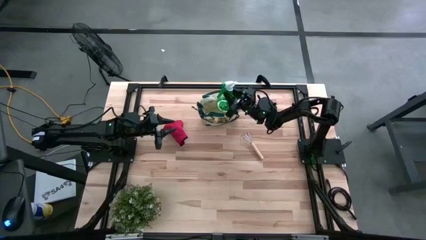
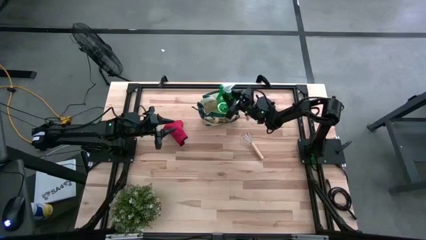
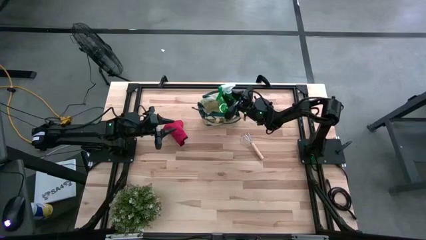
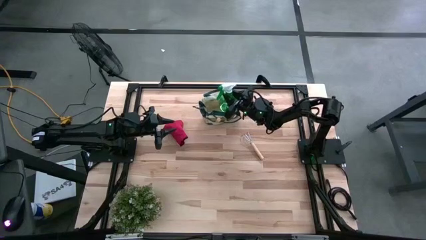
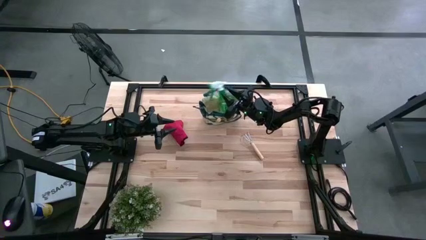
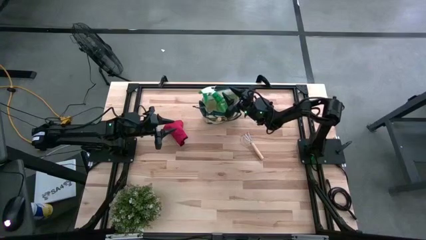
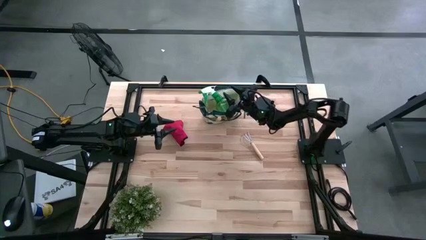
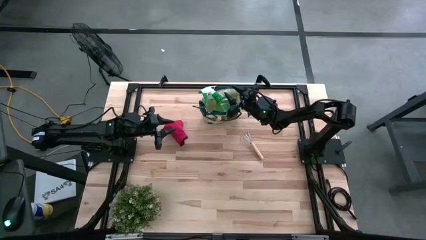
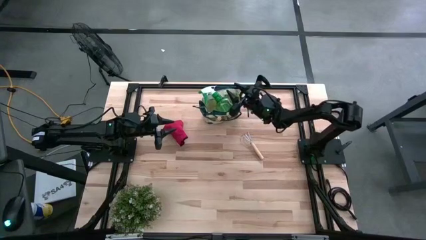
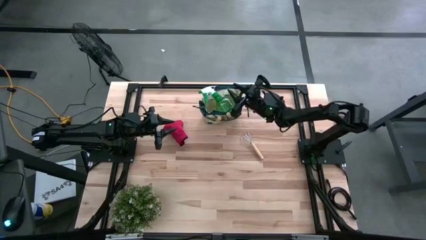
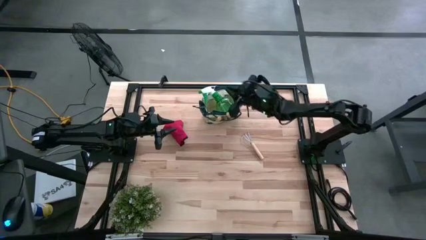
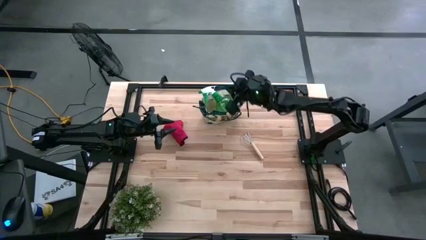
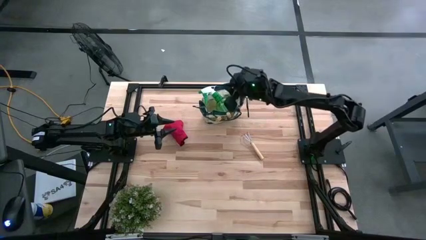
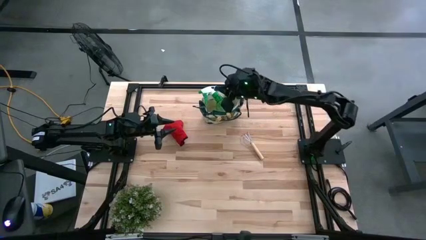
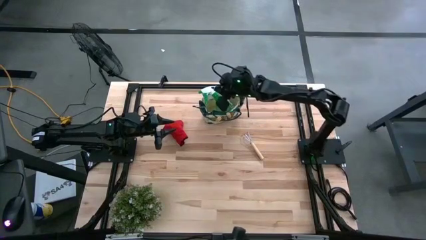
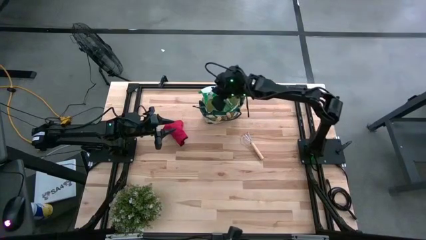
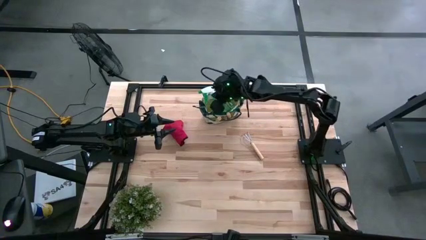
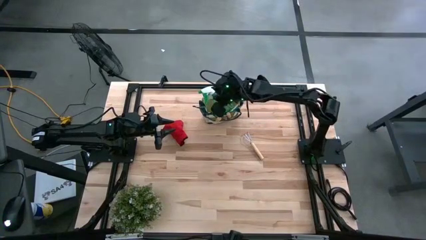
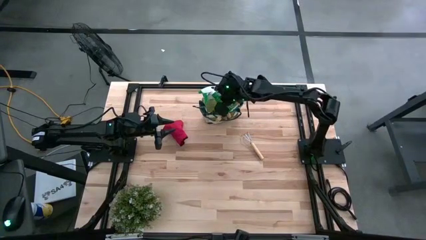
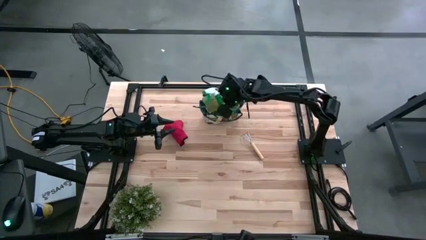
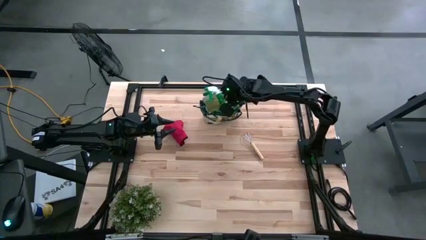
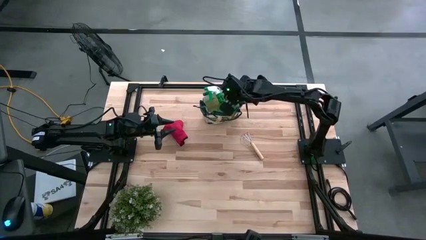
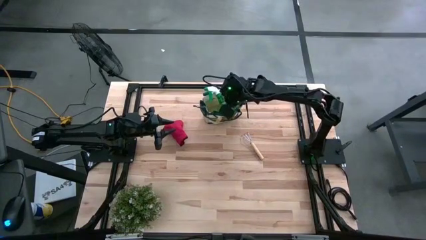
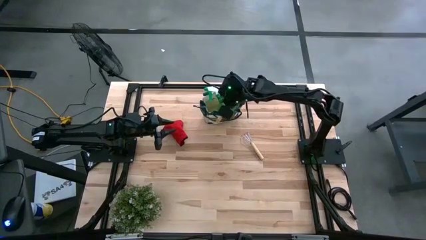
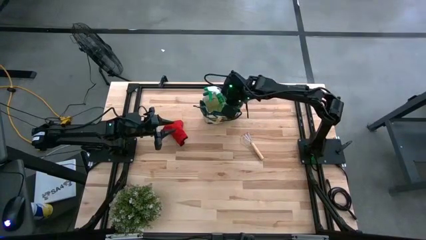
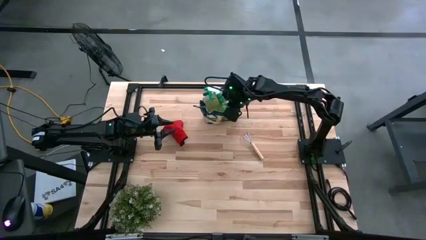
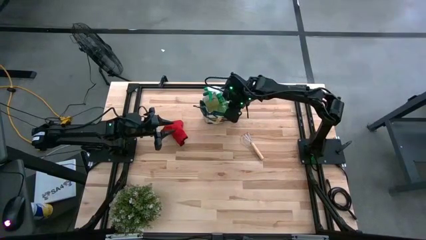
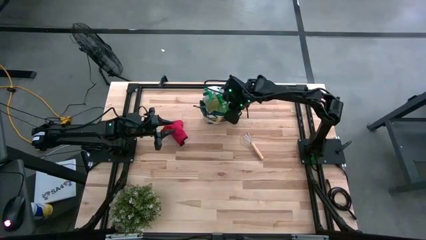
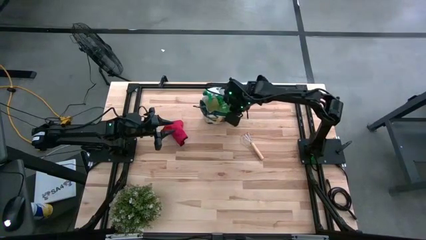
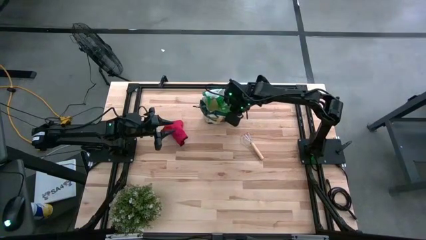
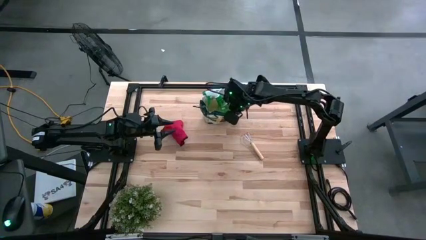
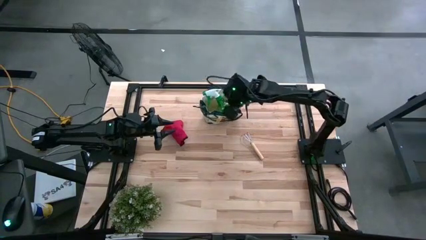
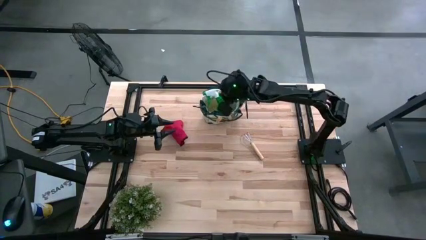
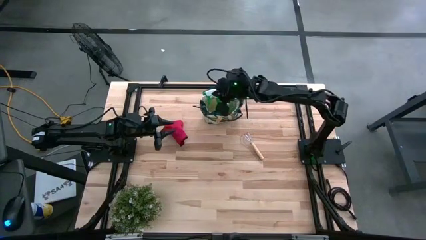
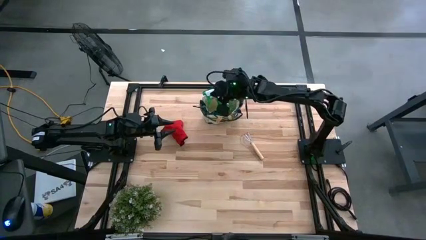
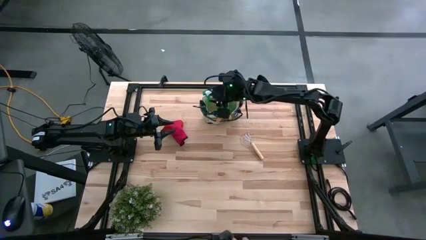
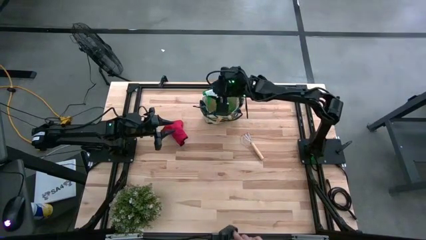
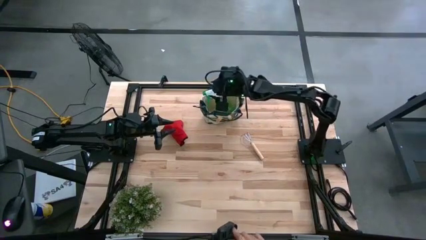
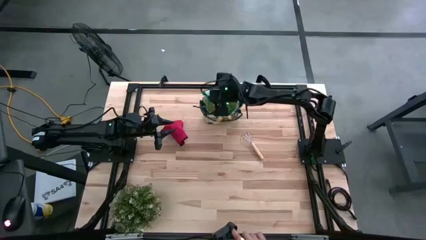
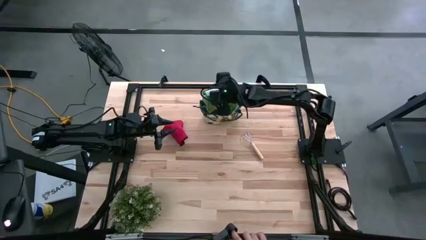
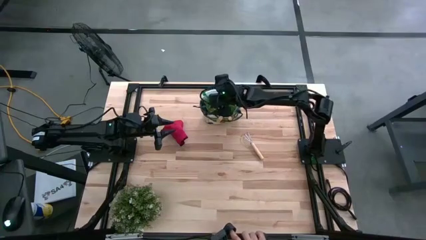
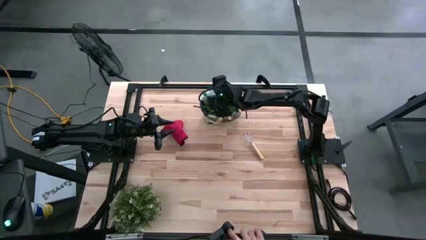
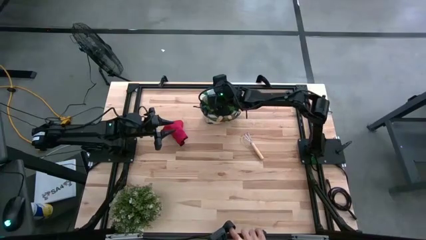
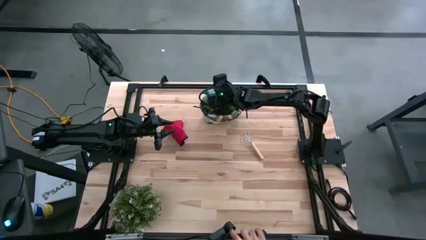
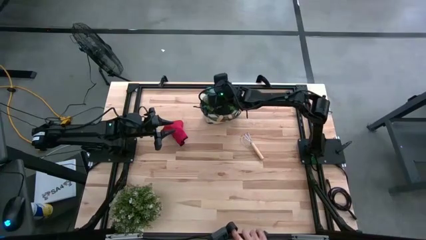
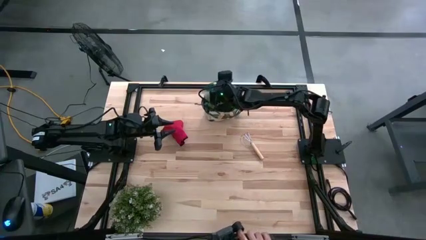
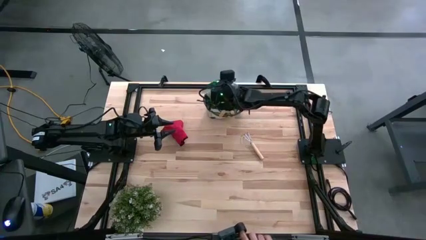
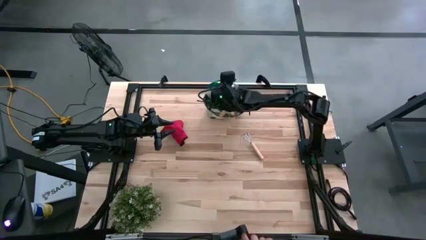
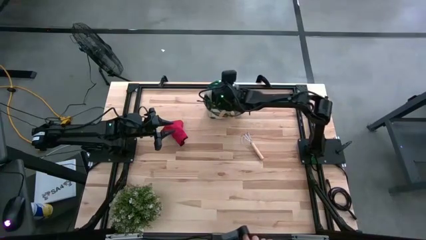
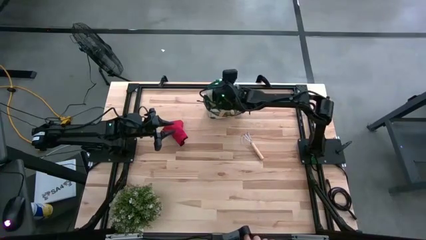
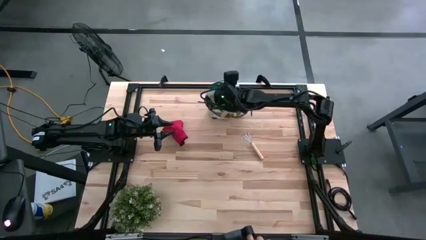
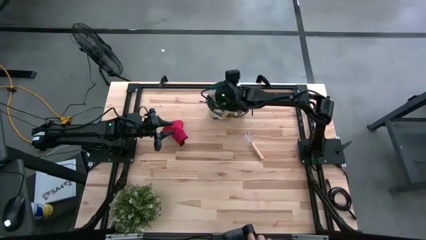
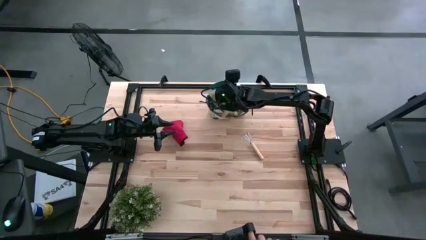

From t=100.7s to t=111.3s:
Task: Pick & Place Garden tools in Gardening bag
Put the green spray bottle into the gardening bag

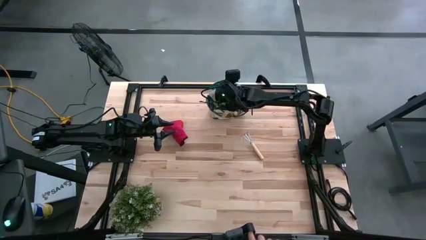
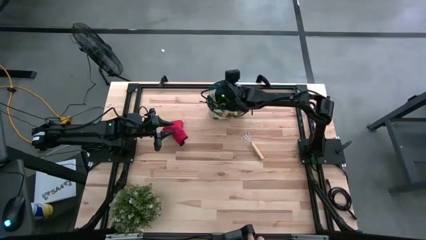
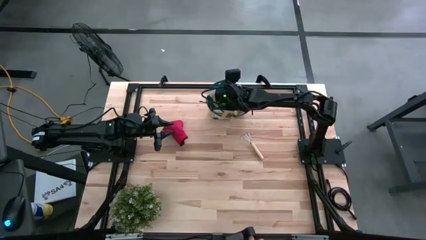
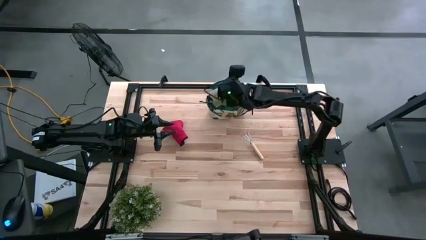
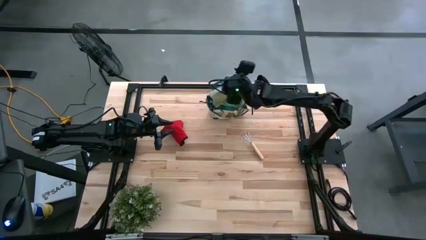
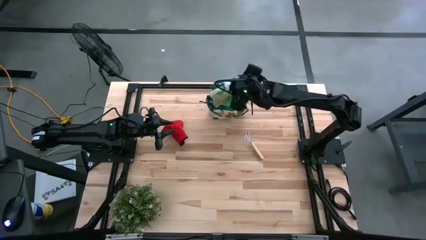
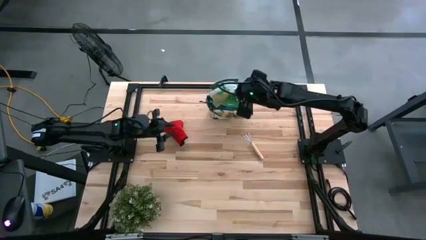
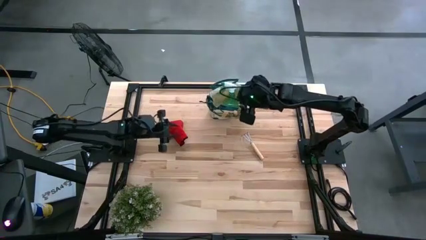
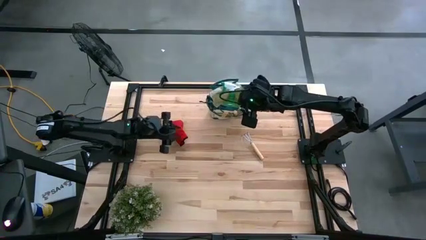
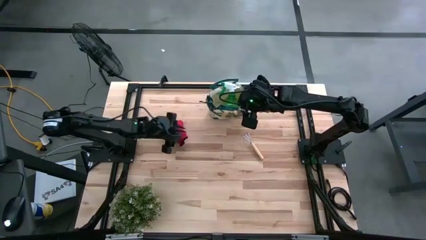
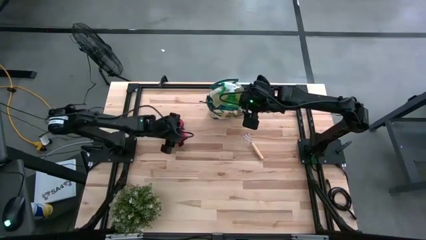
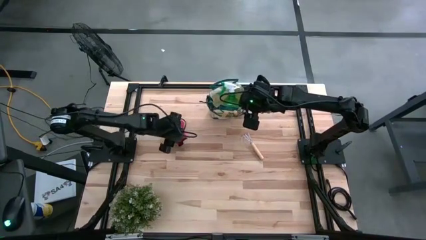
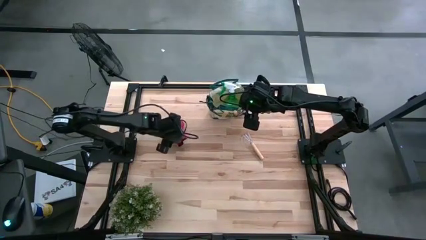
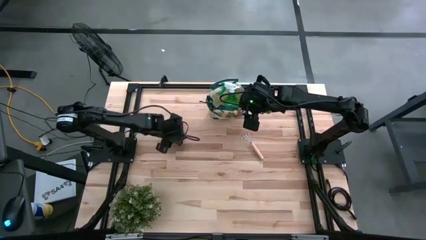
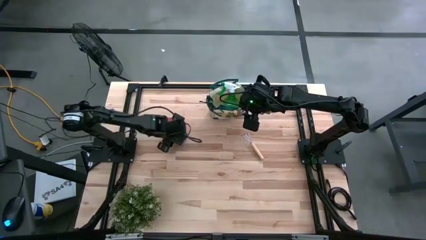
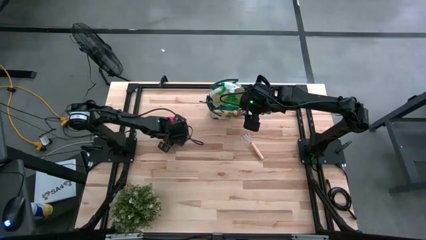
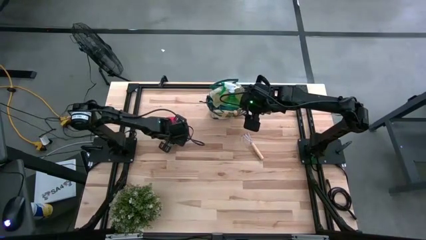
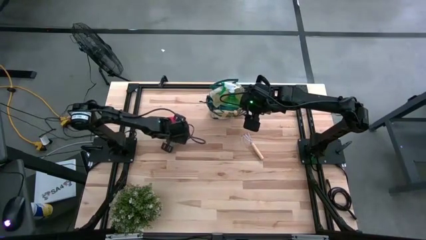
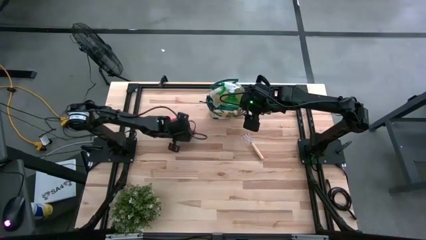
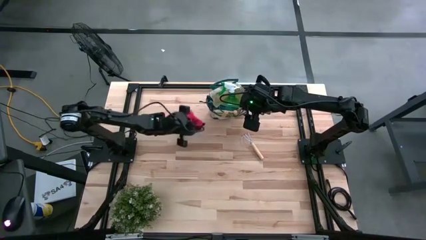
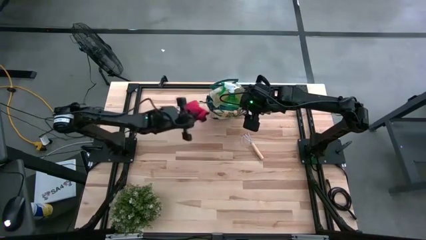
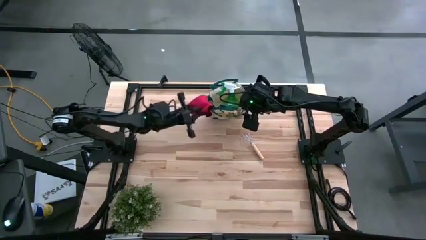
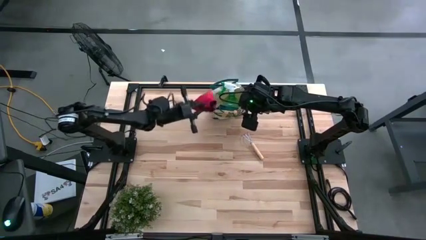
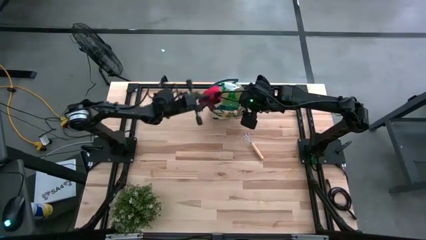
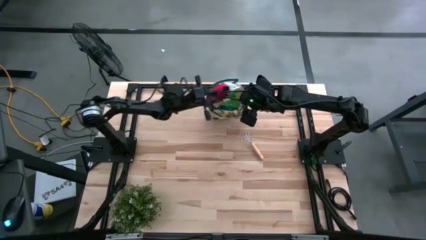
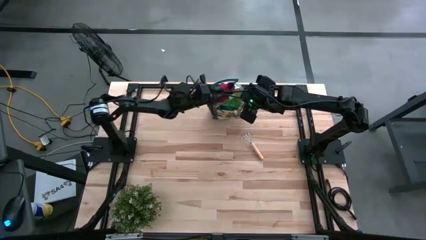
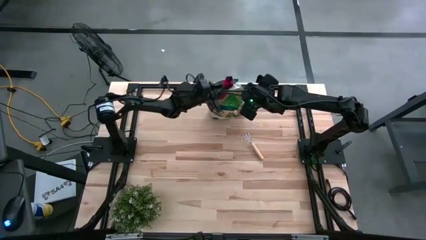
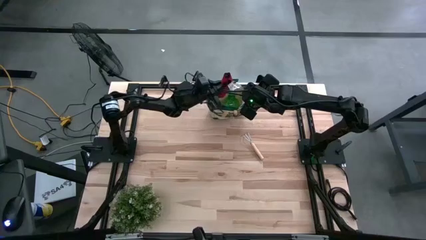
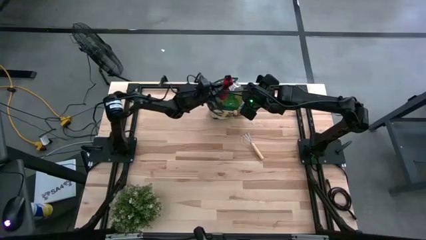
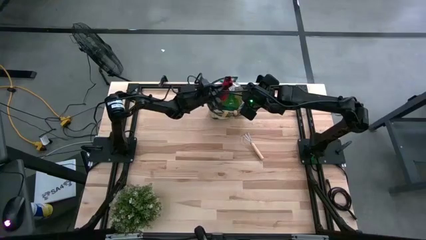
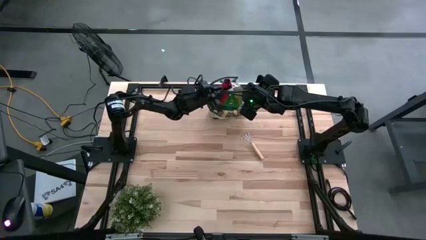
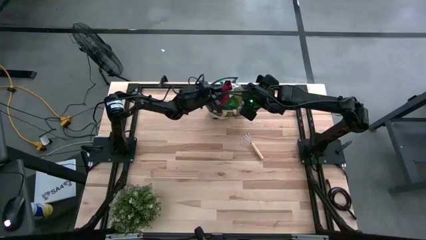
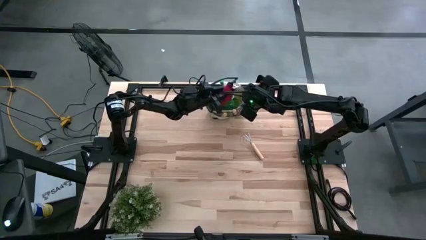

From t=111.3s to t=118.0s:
Put the red gloves into the gardening bag
